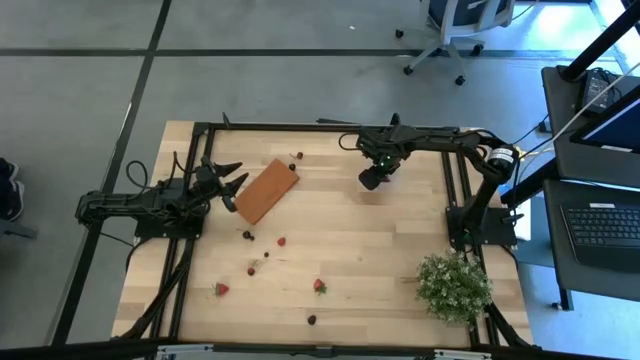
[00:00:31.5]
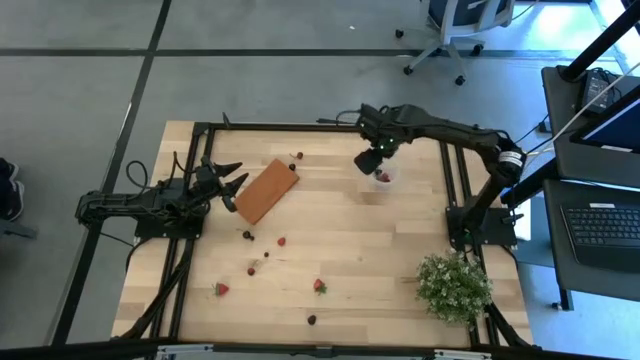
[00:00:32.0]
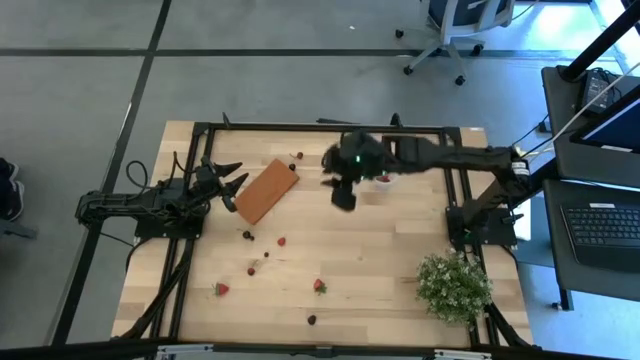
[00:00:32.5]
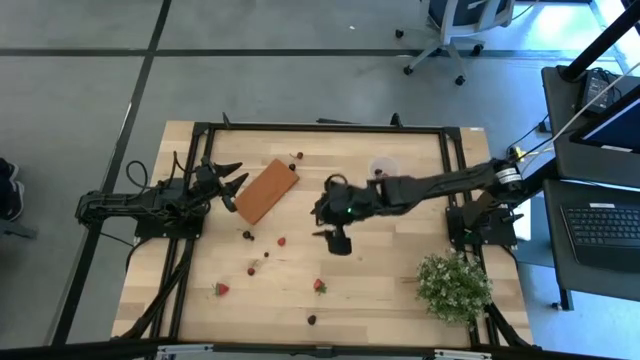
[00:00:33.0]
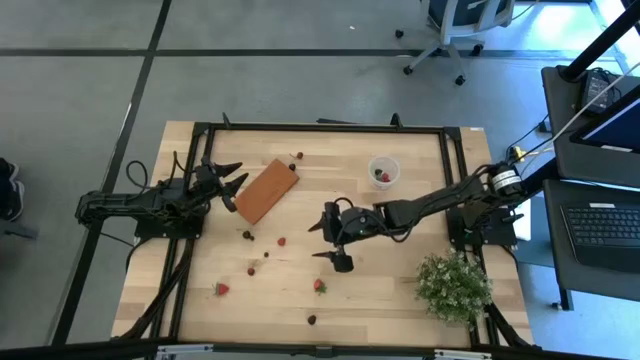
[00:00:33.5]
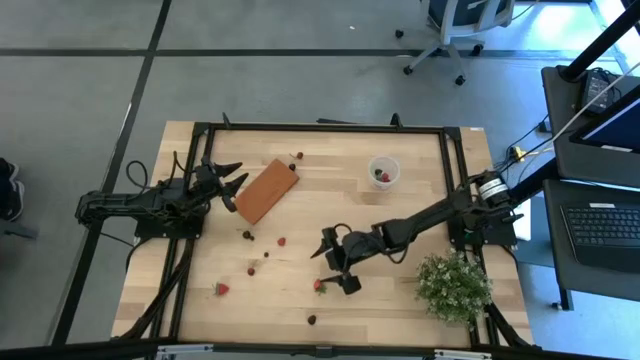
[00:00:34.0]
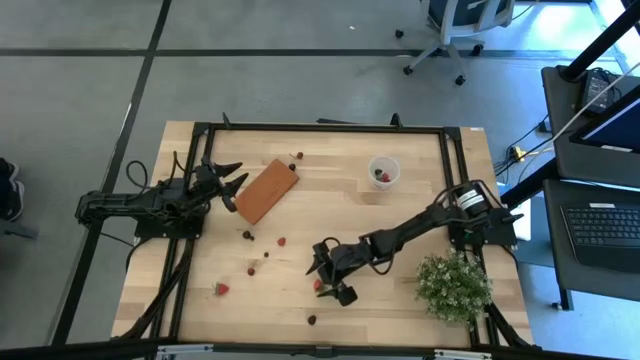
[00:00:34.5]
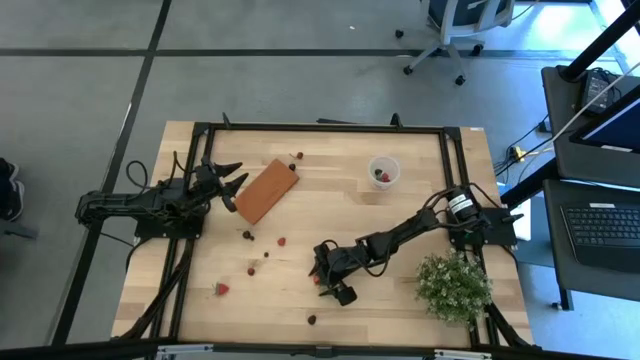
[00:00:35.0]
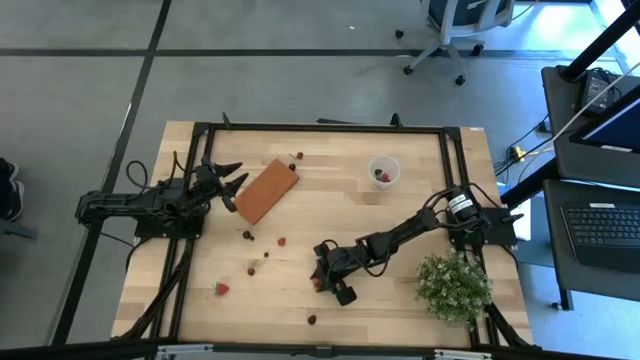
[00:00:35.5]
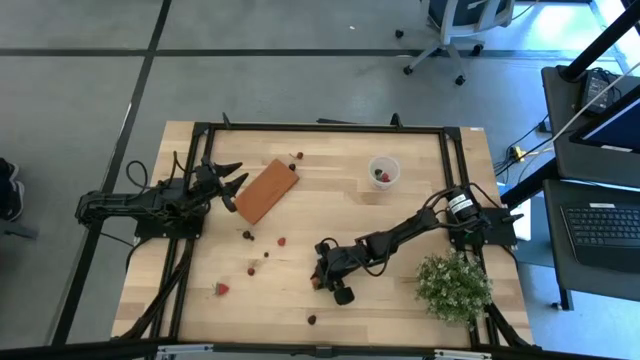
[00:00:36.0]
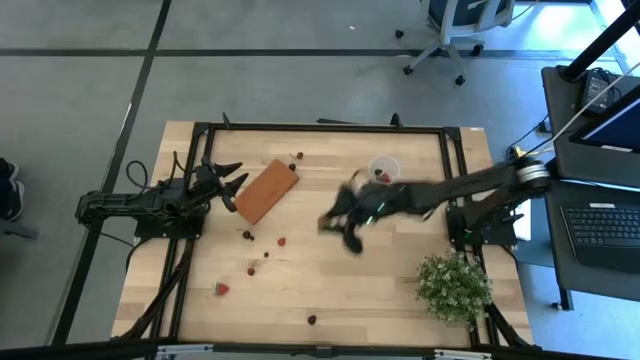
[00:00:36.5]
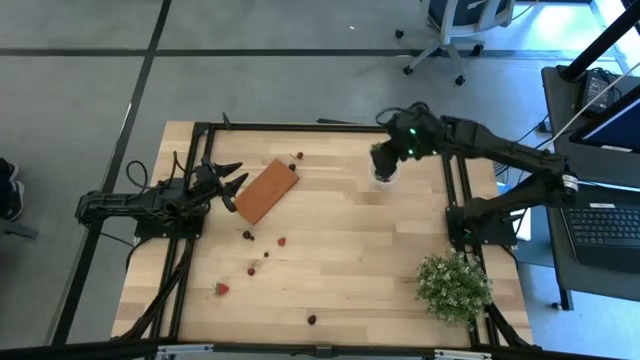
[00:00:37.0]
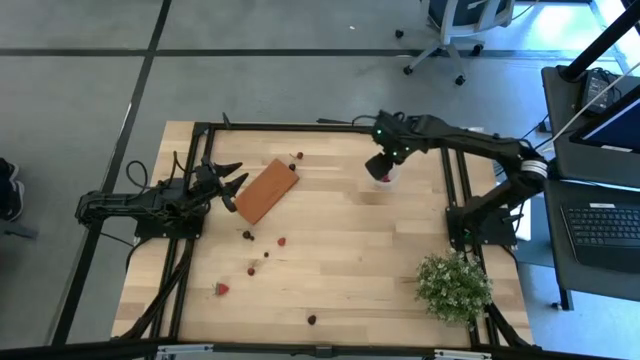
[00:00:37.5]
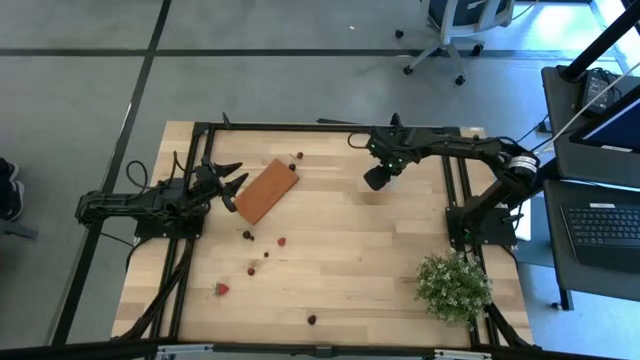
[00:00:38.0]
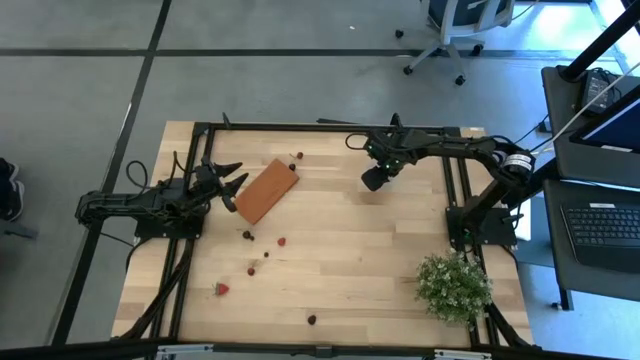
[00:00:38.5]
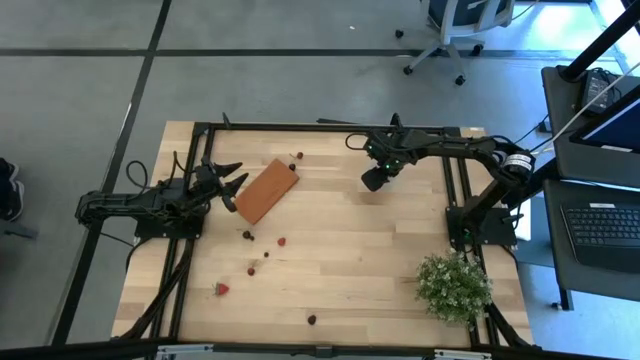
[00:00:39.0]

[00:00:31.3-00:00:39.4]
Task: Pick and placing Produce into tupperware
Put the right red strawberry into the transparent container

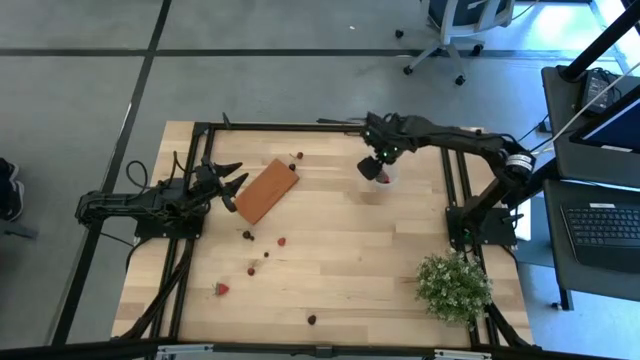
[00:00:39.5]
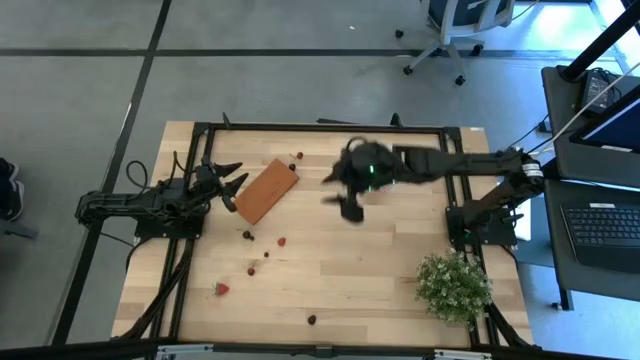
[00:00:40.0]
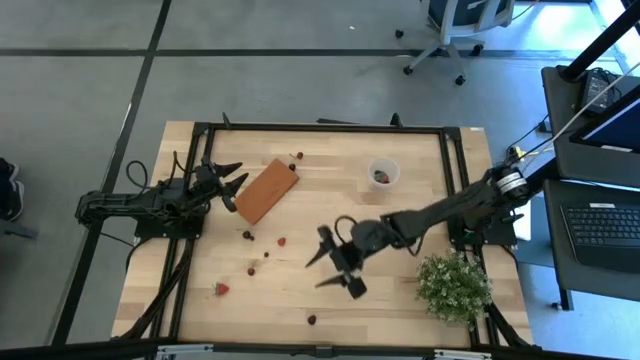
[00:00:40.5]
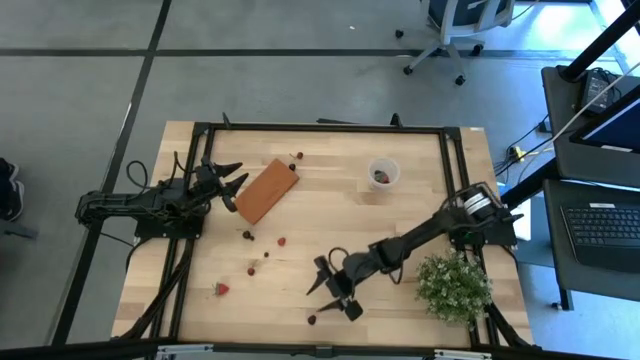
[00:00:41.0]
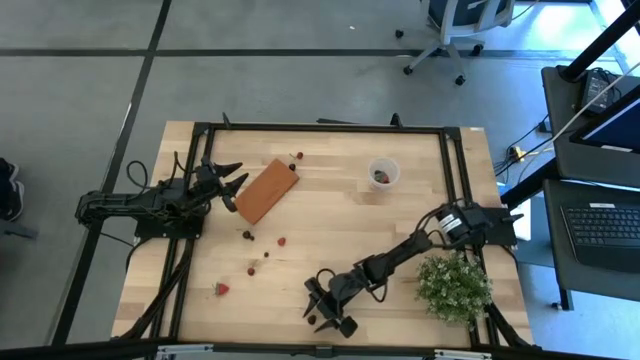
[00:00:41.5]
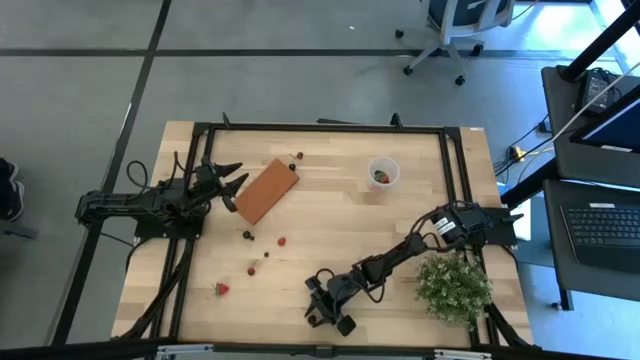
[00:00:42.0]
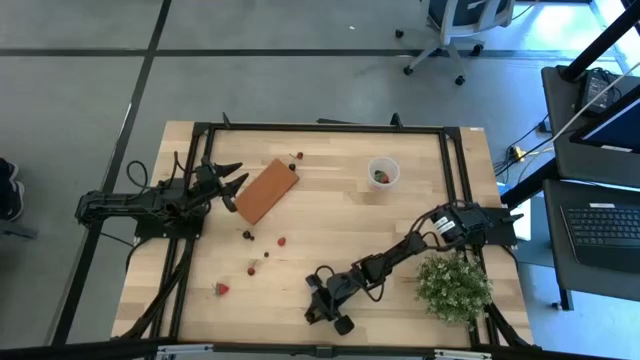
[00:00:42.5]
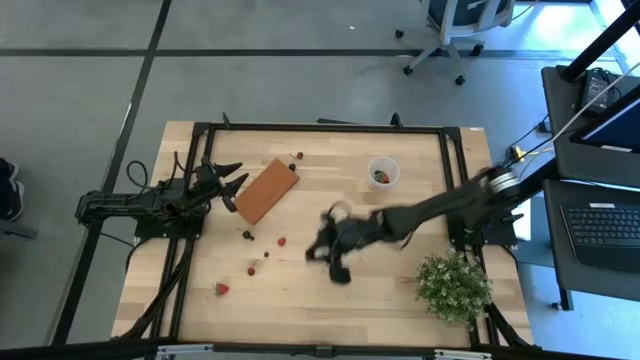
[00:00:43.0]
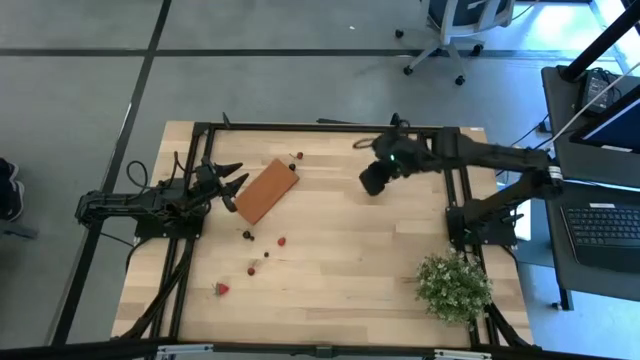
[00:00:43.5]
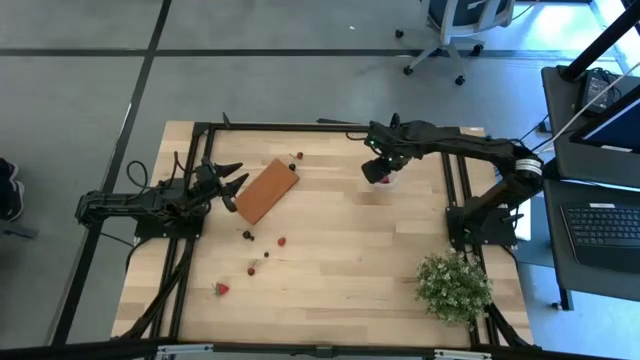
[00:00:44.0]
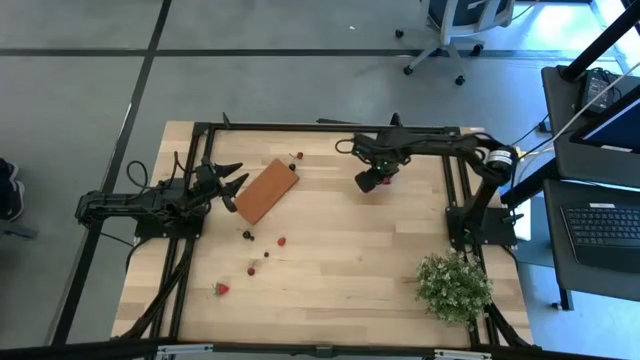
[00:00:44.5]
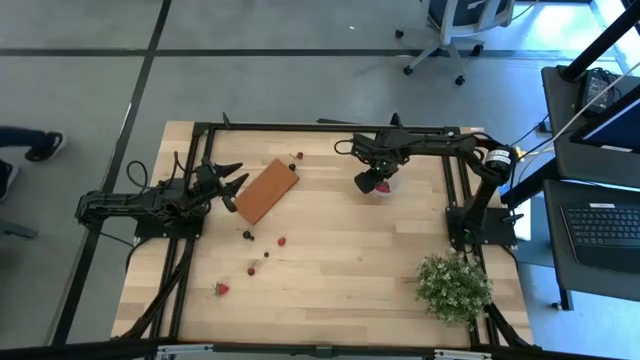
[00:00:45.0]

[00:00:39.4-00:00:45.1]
Put the blackberry into the transparent container

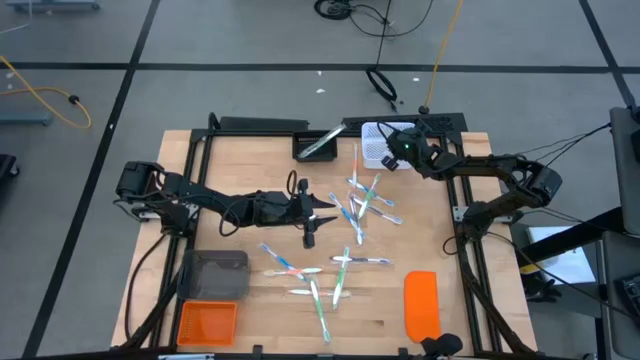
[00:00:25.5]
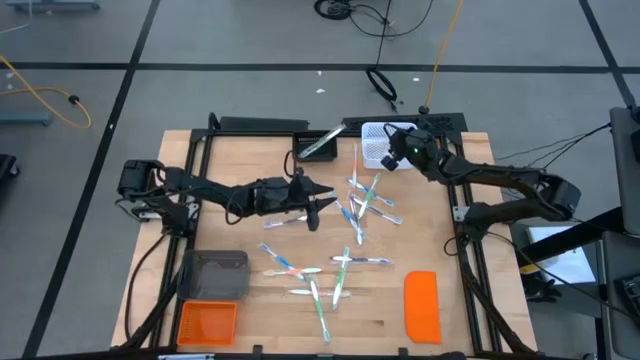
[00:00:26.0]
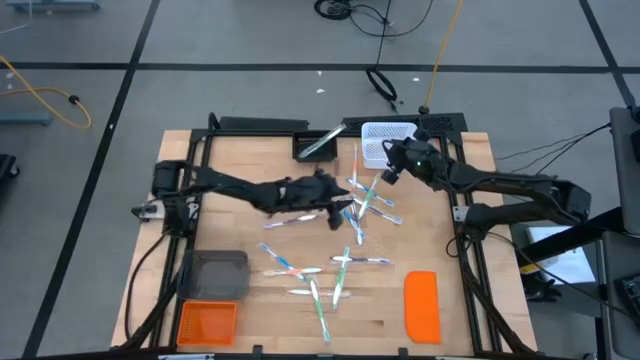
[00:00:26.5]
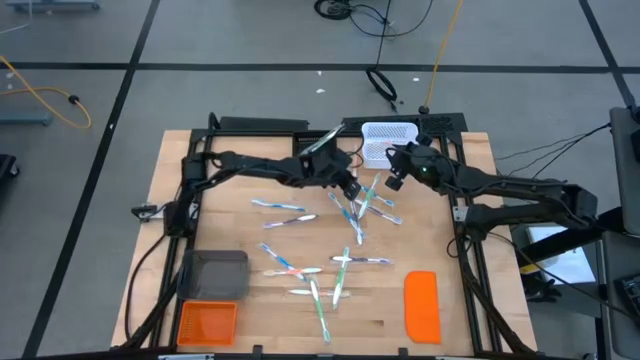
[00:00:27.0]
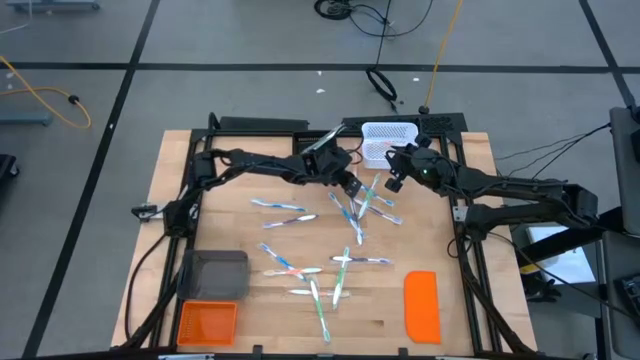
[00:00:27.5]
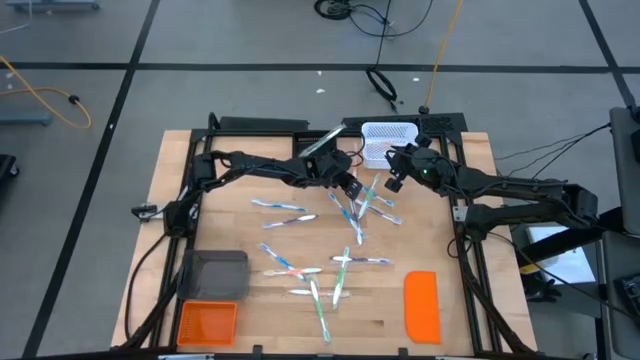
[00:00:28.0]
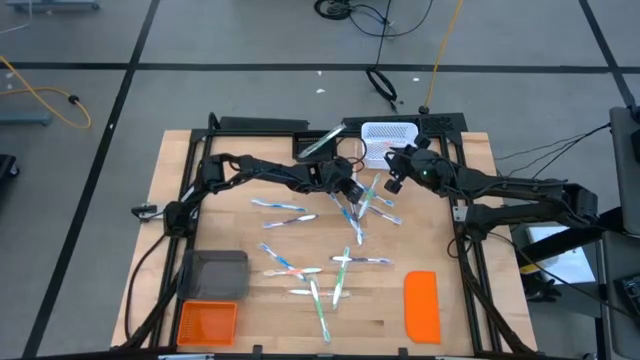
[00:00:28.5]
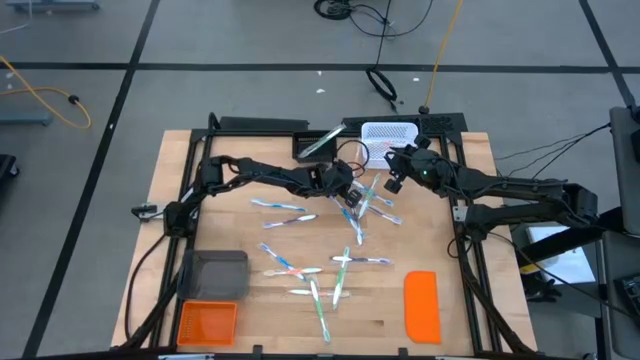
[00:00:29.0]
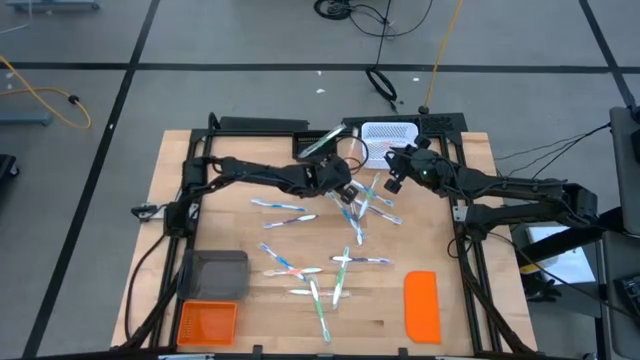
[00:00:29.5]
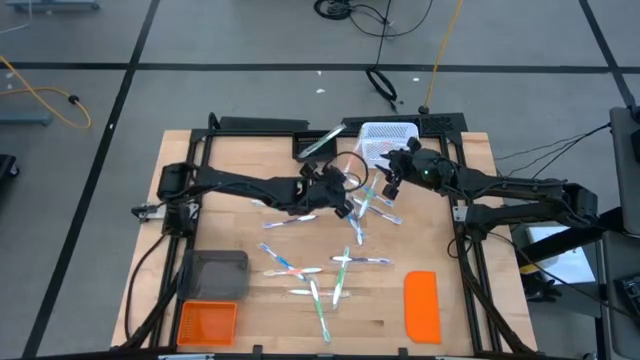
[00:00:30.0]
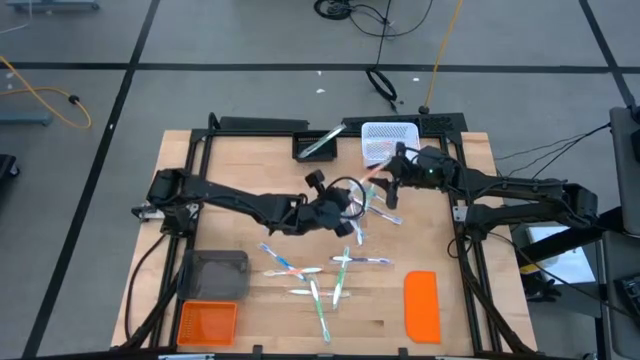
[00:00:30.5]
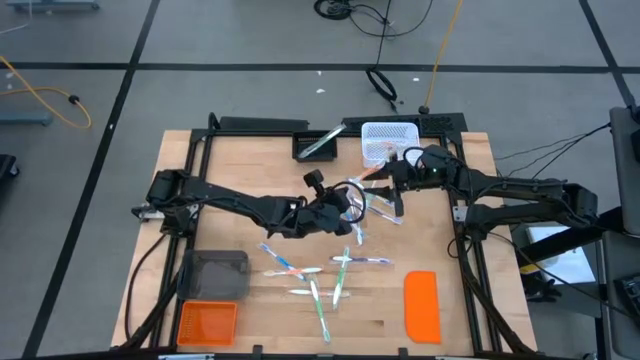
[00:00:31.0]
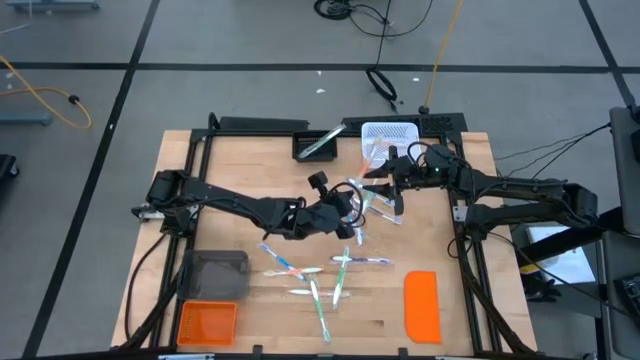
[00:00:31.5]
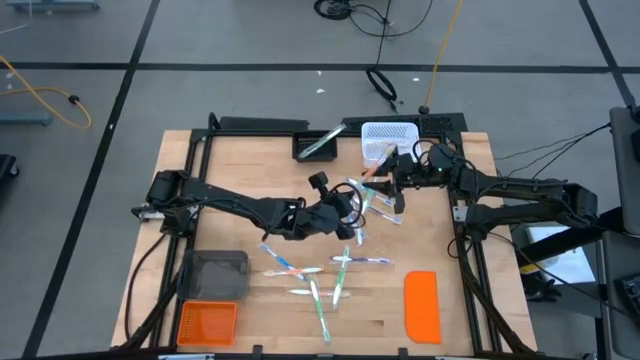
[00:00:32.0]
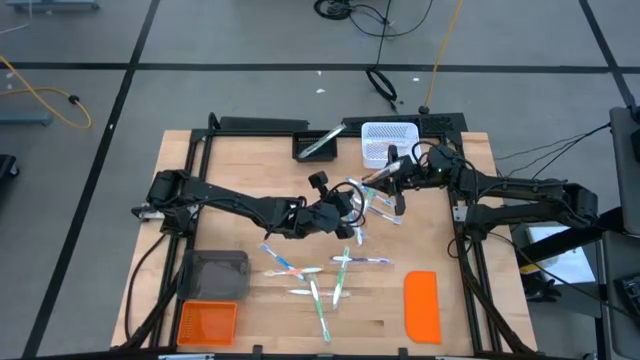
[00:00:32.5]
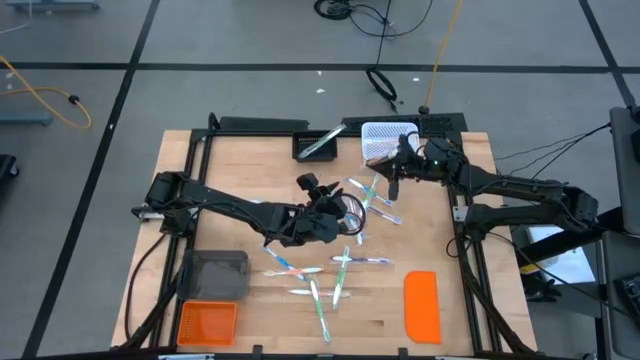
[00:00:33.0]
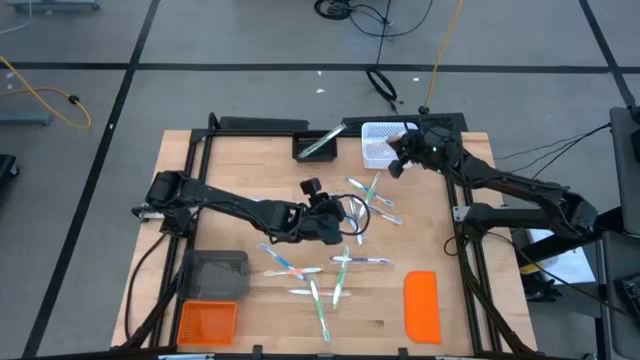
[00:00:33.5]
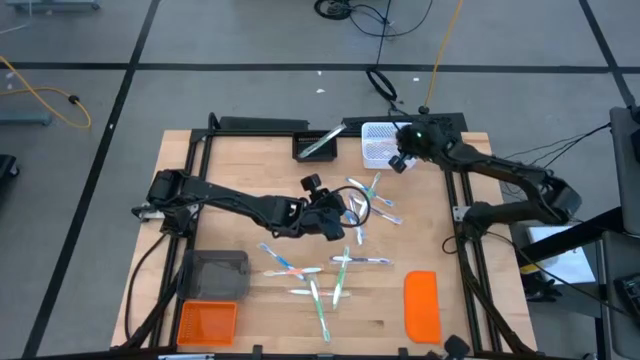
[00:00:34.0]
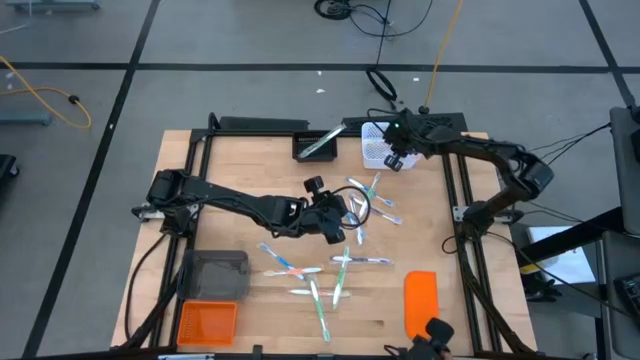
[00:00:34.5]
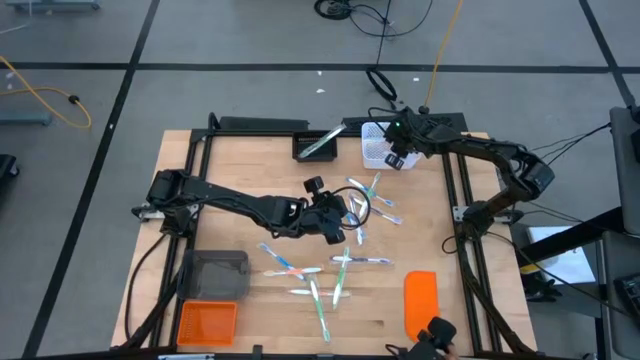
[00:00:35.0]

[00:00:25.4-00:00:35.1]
Task: Pick & Place Toothbrushes
Put the orange toothbrush into the white bin
